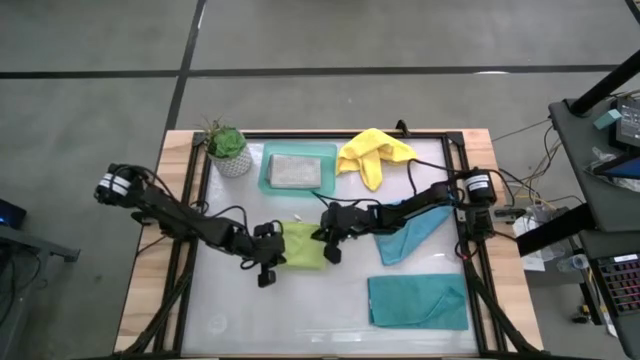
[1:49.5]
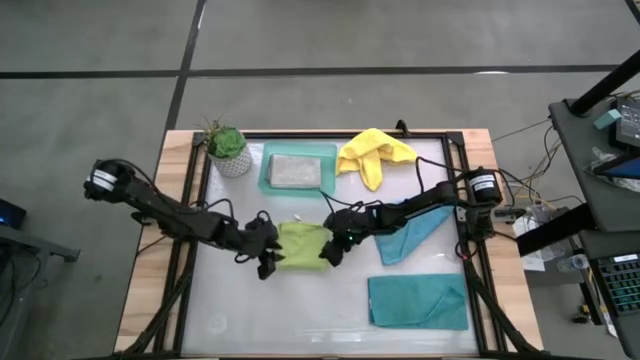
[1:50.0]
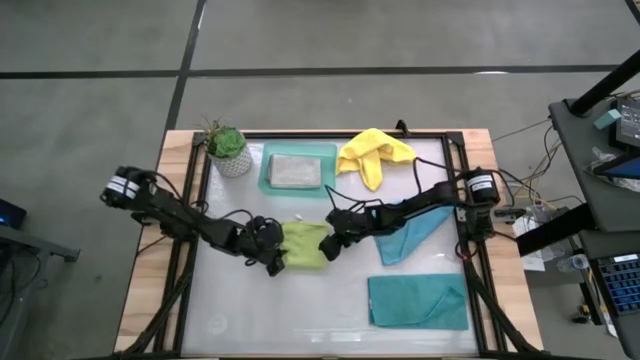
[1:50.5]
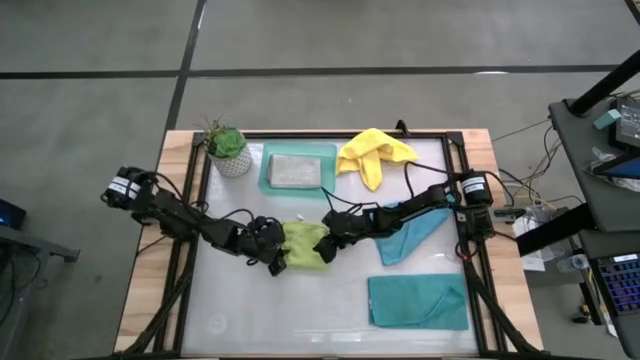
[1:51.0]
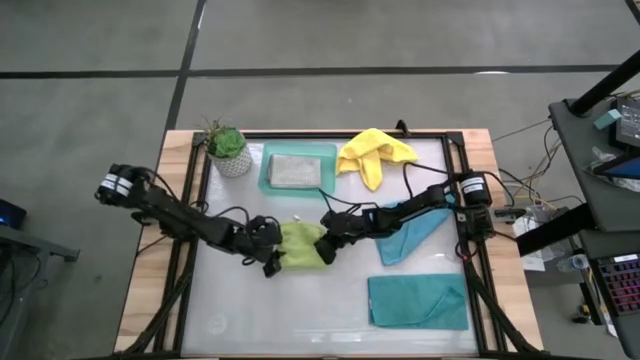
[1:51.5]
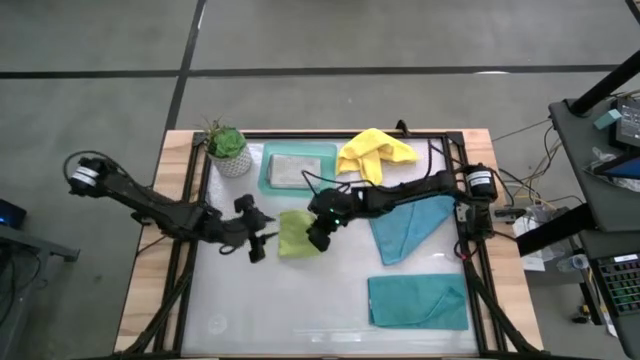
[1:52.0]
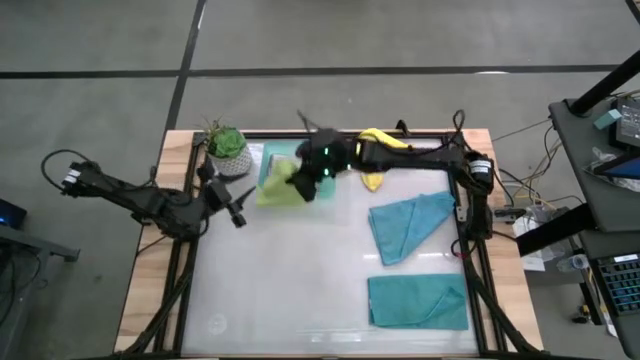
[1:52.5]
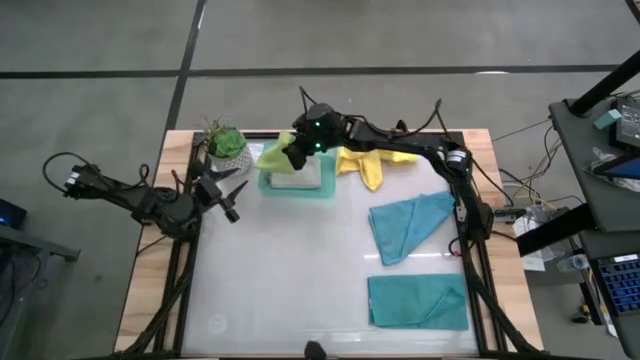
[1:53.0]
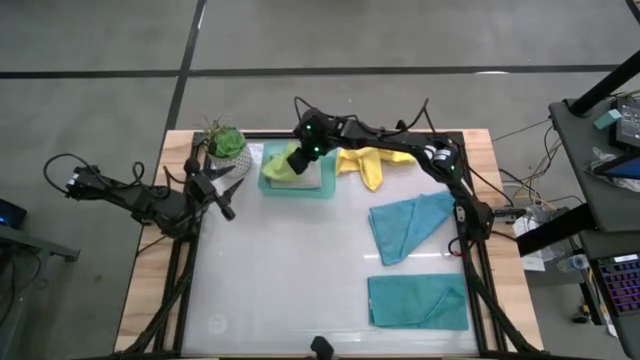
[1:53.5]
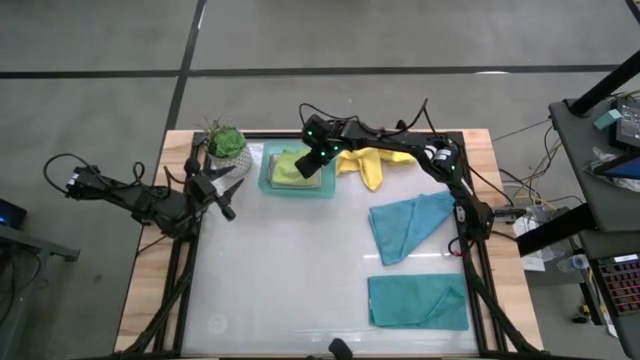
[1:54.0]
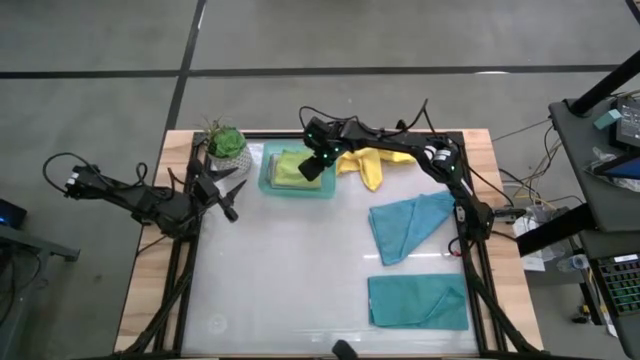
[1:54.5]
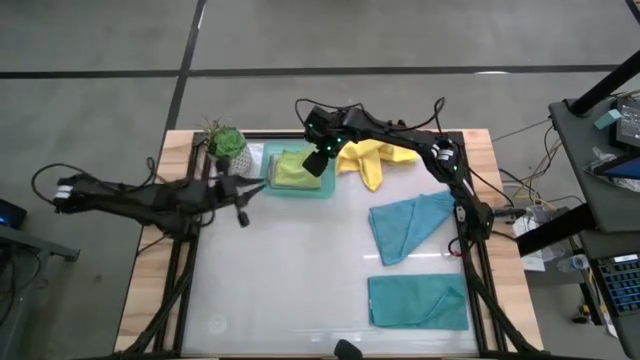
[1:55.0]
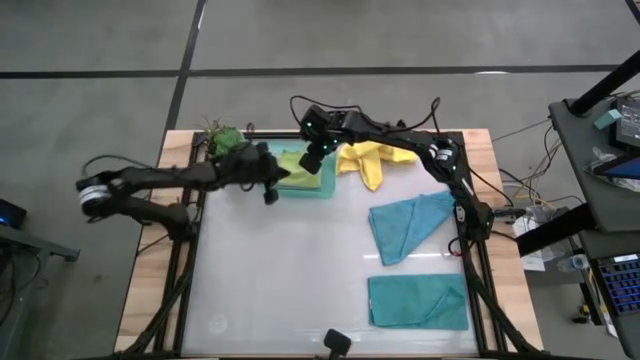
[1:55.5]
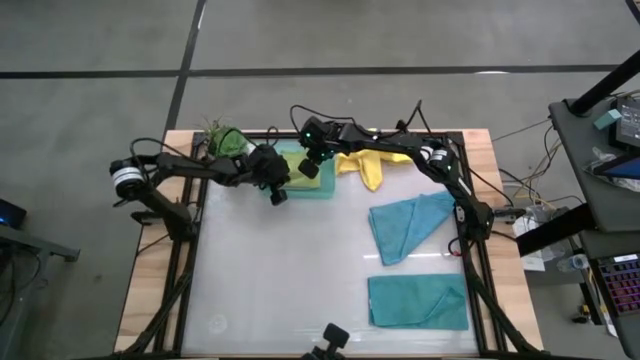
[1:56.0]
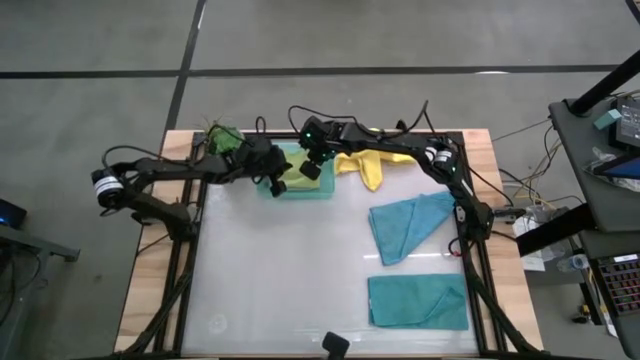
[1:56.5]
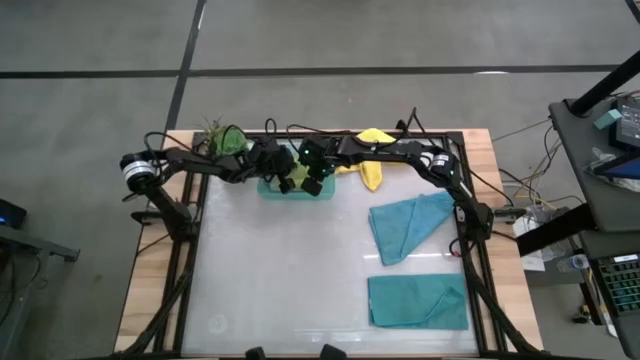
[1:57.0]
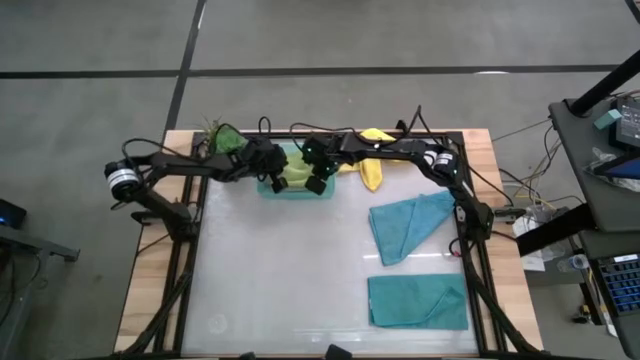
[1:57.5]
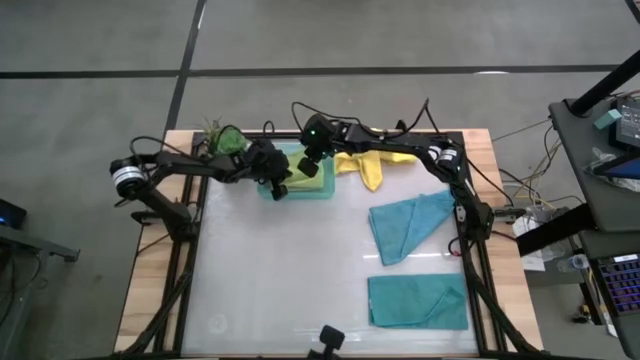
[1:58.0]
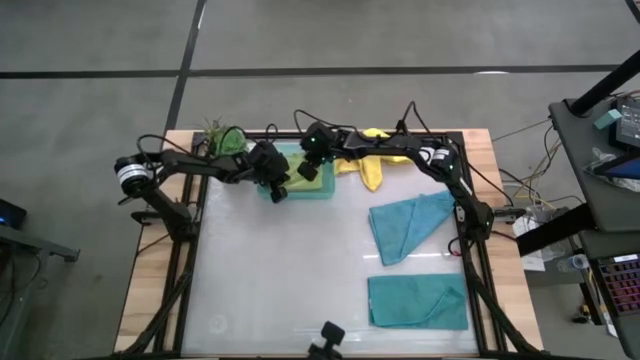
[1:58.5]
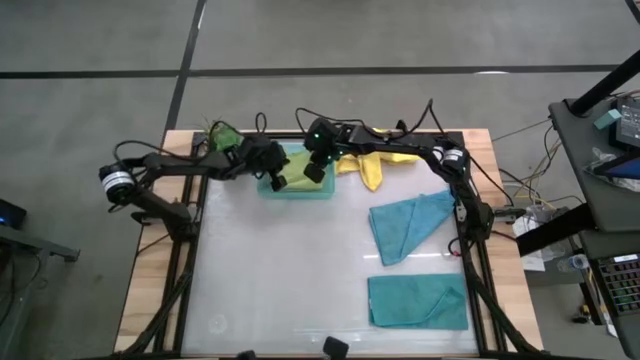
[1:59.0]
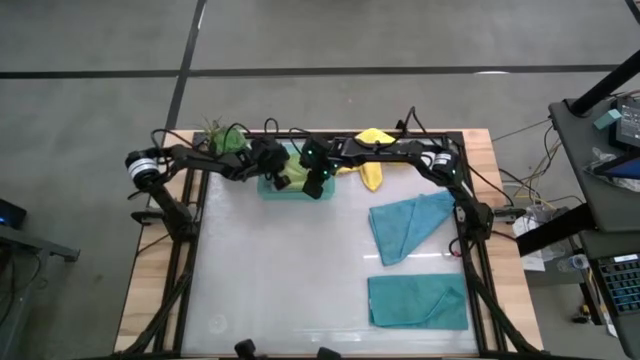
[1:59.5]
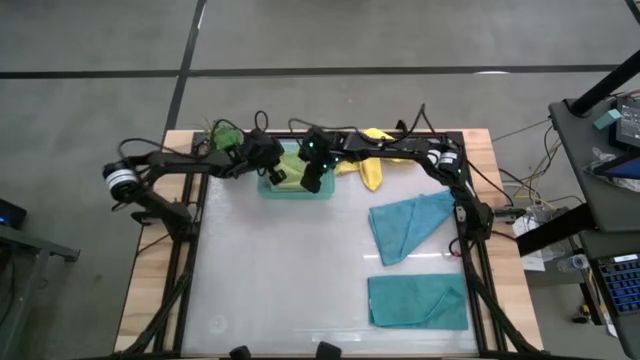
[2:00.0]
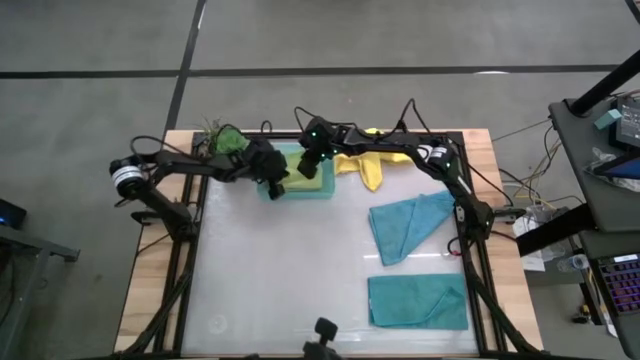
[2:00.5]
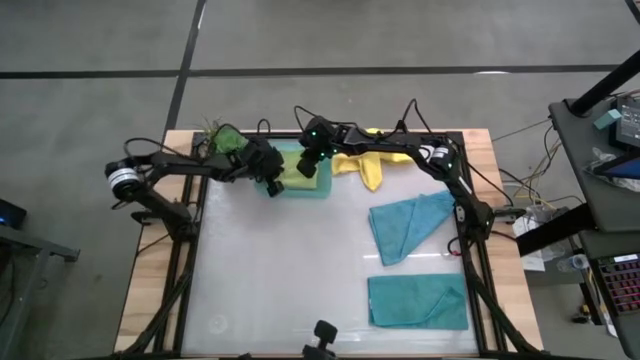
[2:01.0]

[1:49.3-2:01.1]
Task: Fold microfiber towels
Put the green microfiber towel into the bin

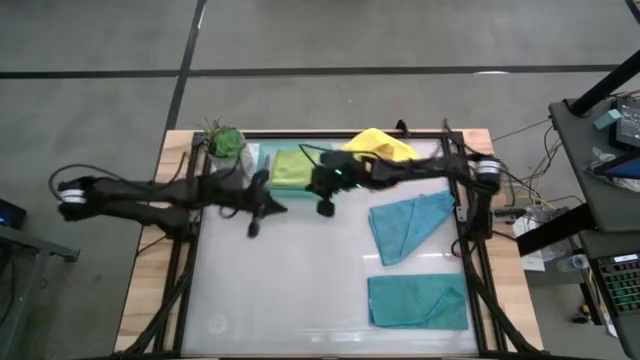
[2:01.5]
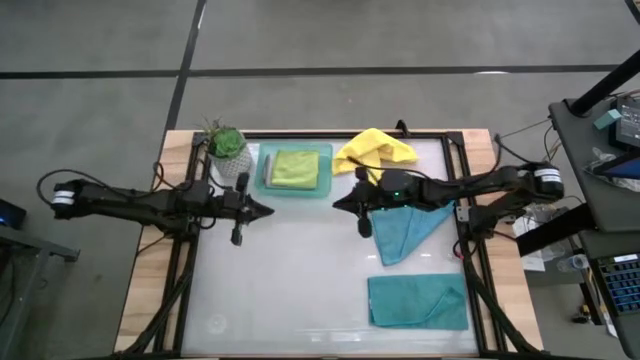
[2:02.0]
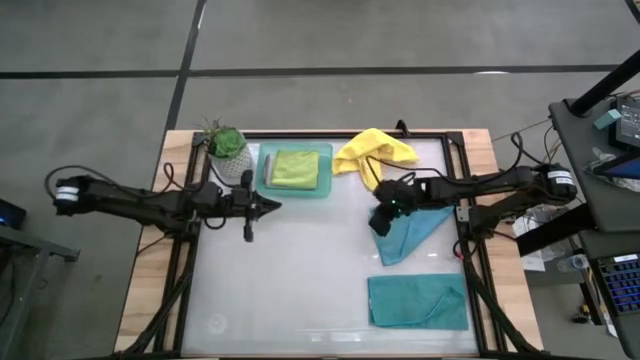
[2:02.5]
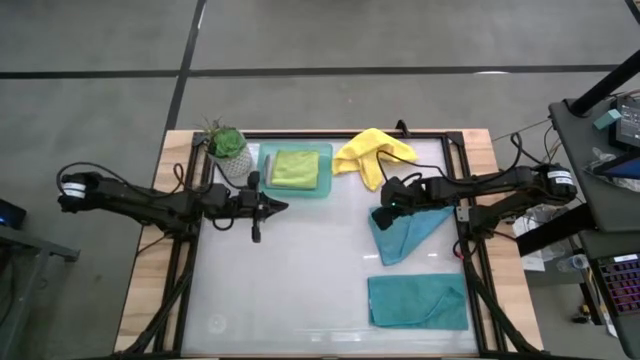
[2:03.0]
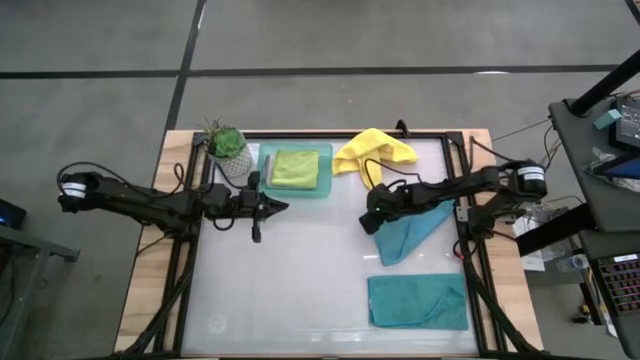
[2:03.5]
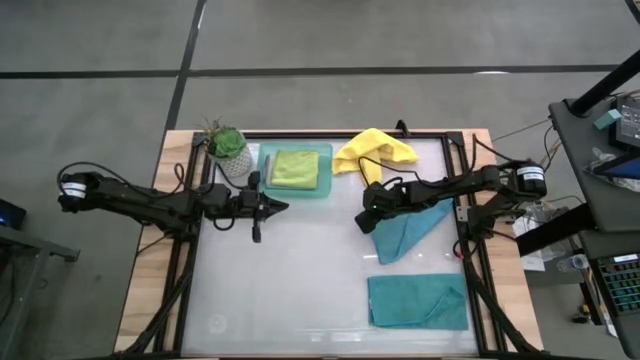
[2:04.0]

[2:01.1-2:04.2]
Fold the top blue microfiber towel

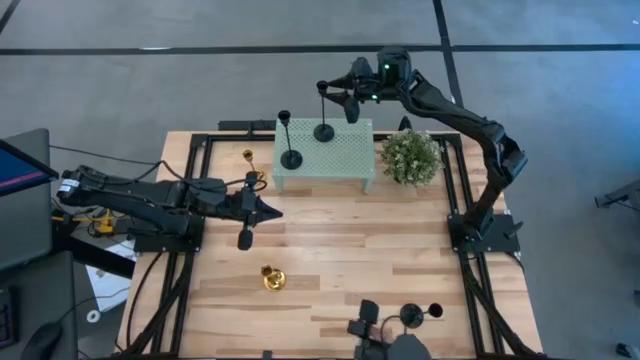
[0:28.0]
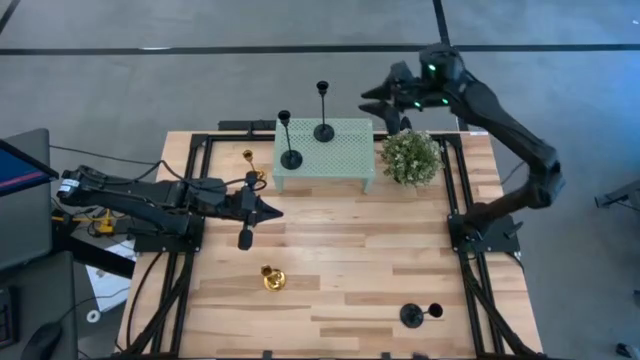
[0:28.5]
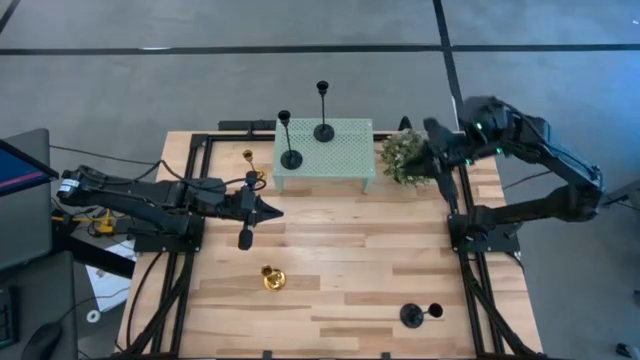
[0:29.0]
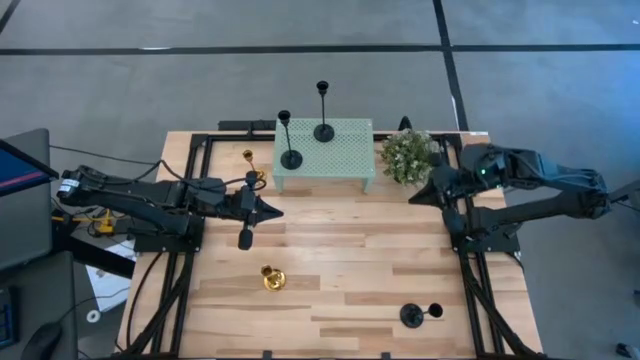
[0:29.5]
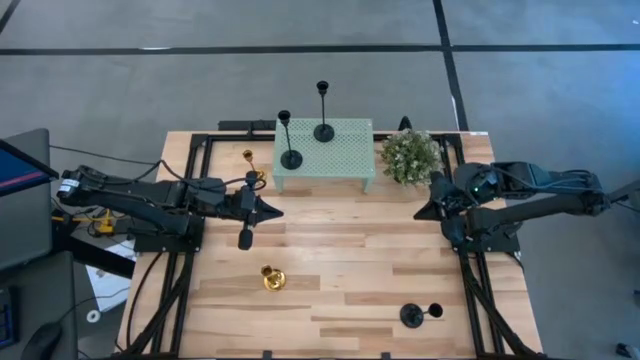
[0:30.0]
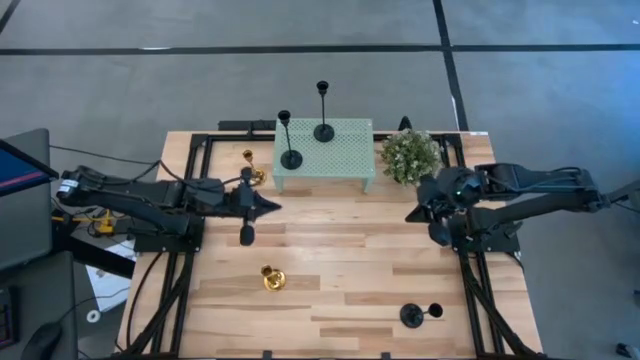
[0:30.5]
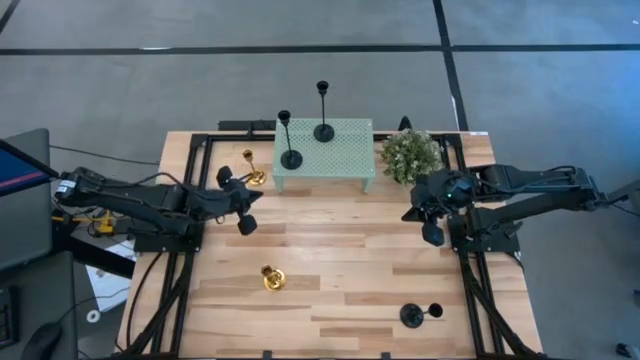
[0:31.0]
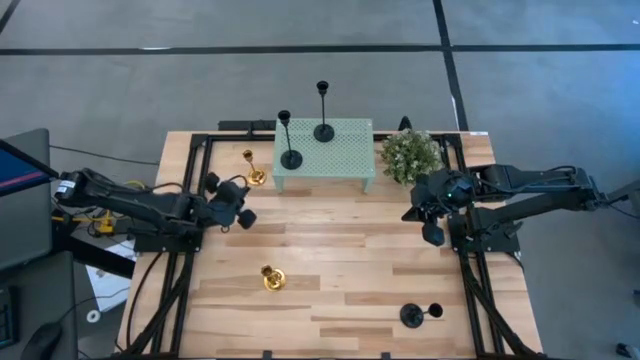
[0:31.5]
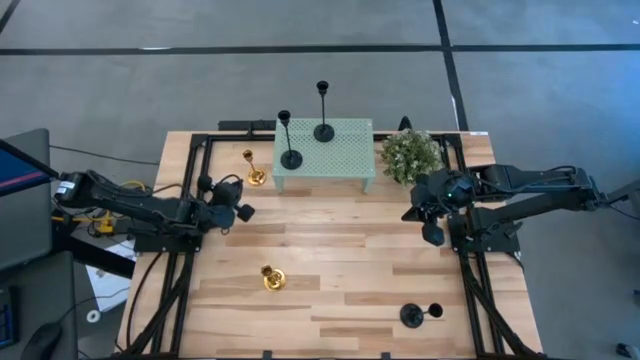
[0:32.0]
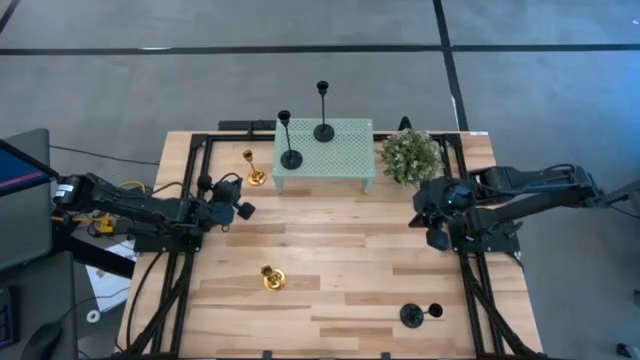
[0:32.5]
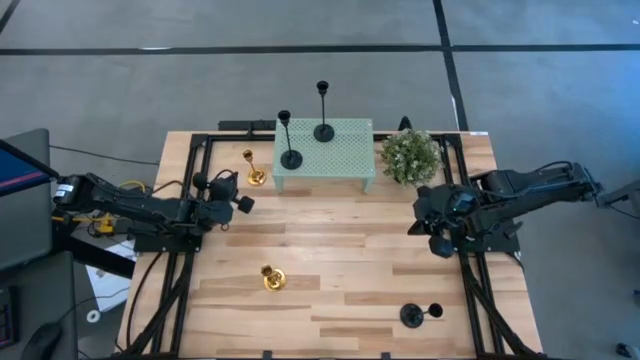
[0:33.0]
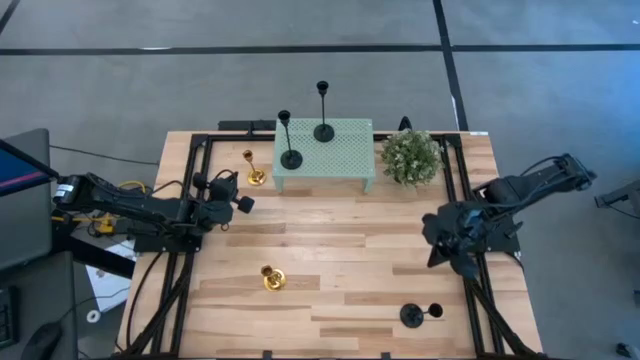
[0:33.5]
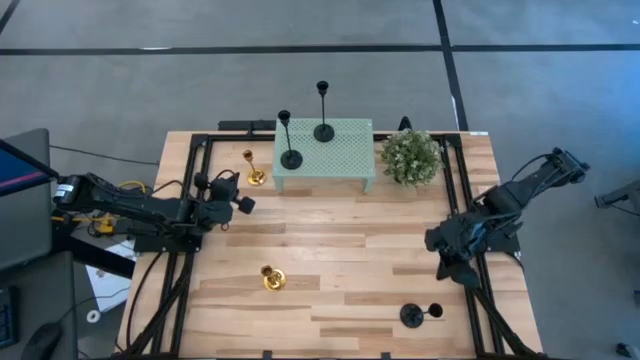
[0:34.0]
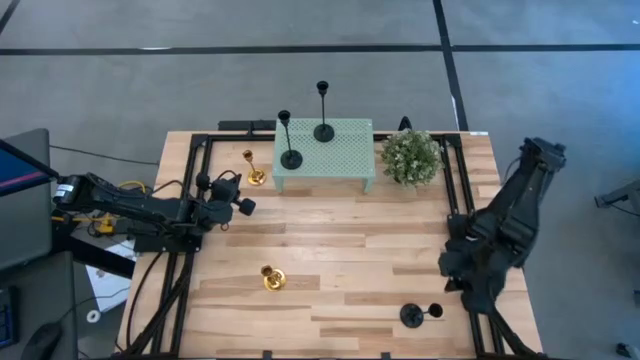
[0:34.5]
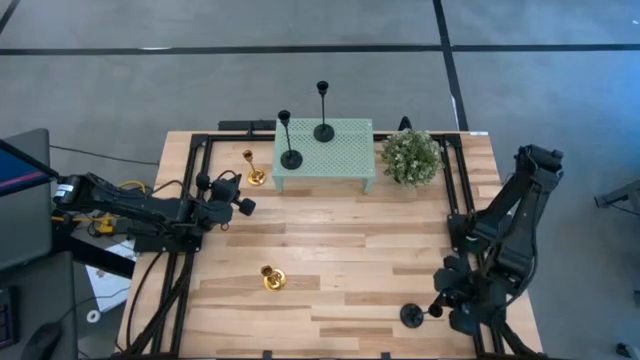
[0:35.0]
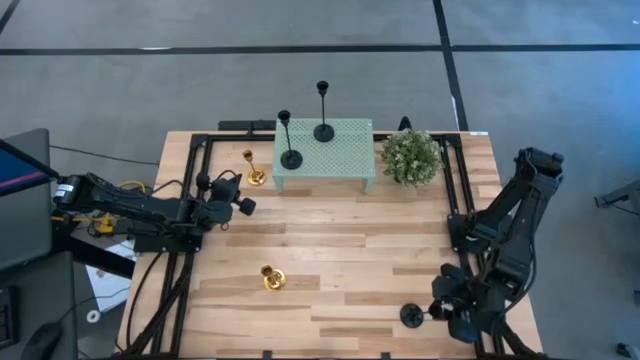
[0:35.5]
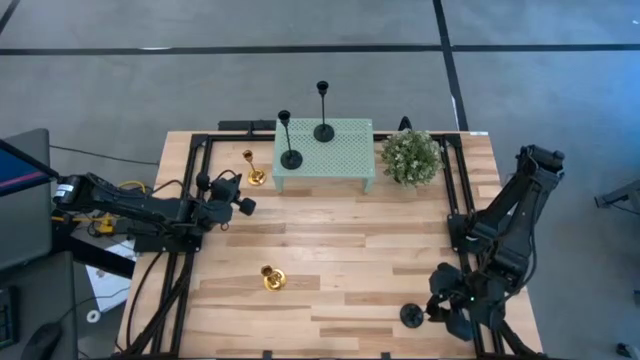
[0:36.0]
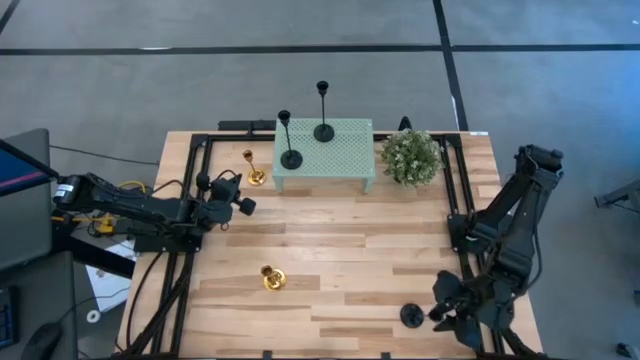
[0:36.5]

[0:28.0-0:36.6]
Task: Pick & Place candle stick holders
Put the black candle holder on the shelf
